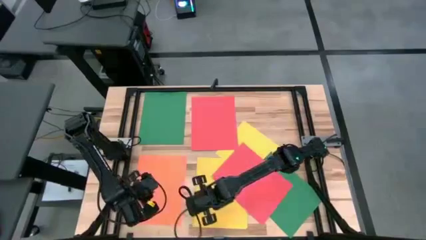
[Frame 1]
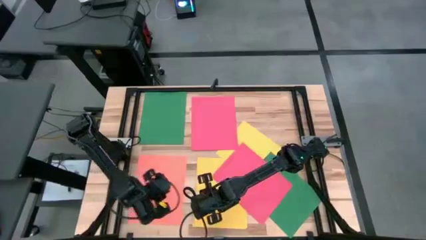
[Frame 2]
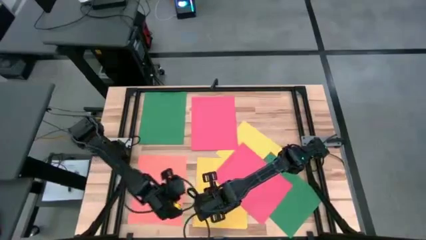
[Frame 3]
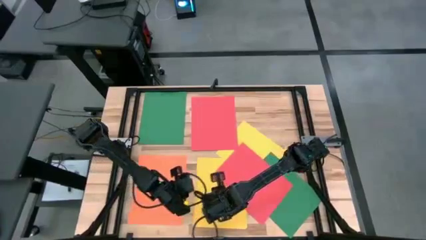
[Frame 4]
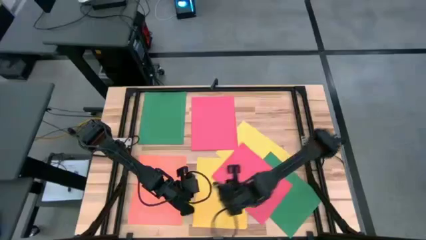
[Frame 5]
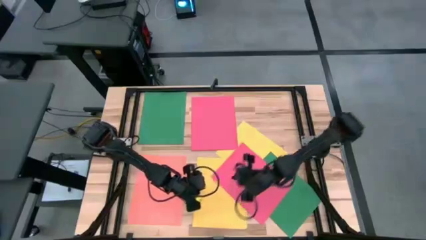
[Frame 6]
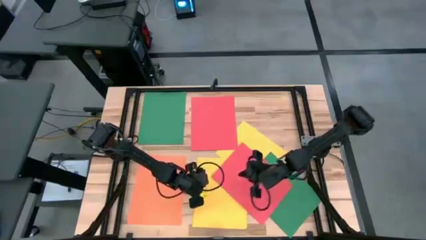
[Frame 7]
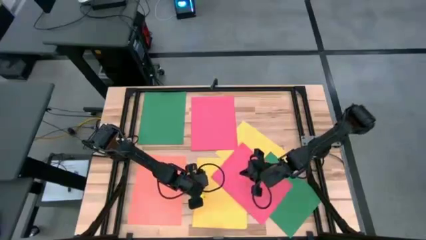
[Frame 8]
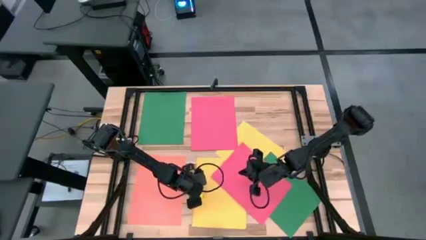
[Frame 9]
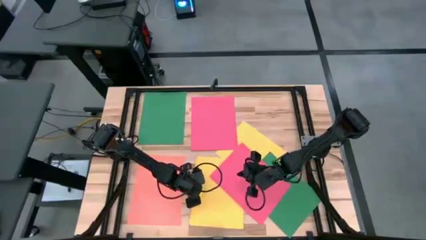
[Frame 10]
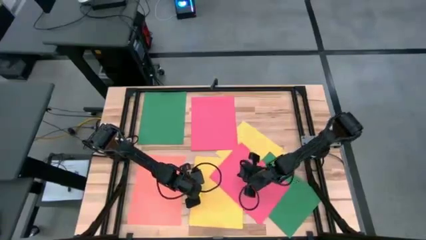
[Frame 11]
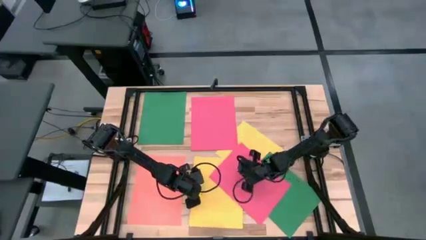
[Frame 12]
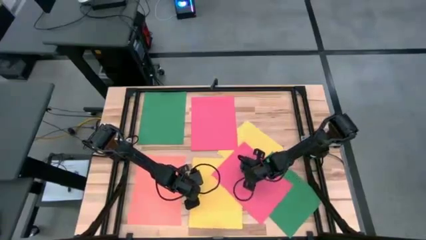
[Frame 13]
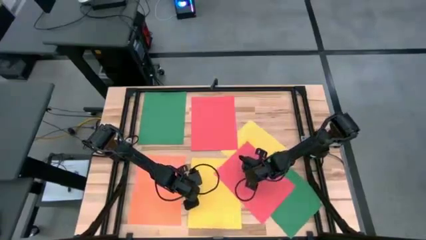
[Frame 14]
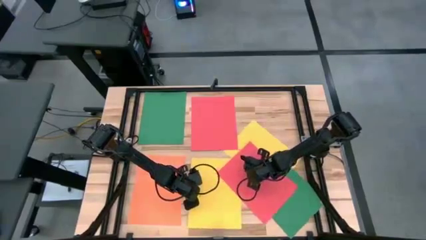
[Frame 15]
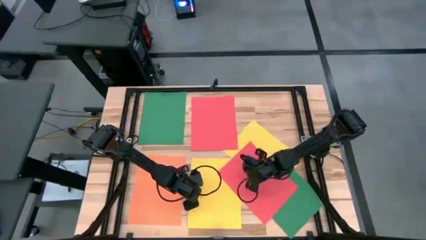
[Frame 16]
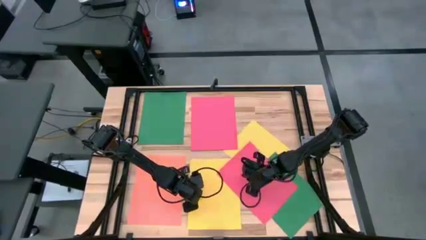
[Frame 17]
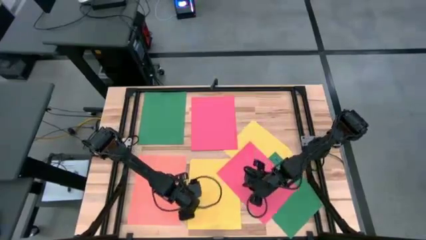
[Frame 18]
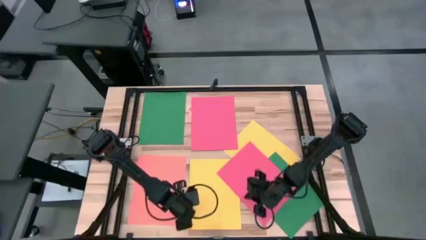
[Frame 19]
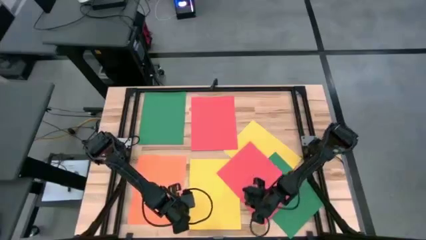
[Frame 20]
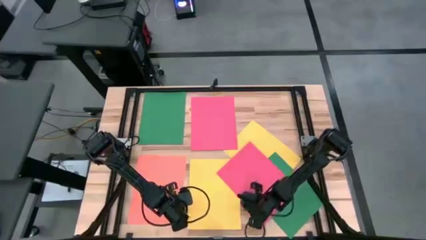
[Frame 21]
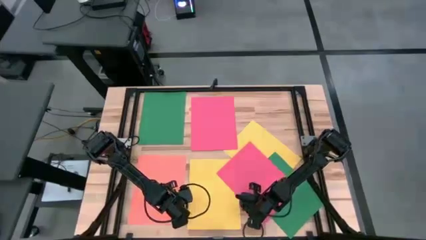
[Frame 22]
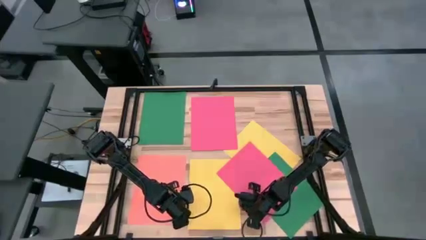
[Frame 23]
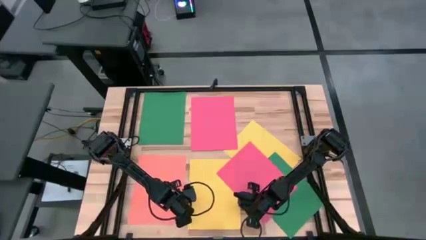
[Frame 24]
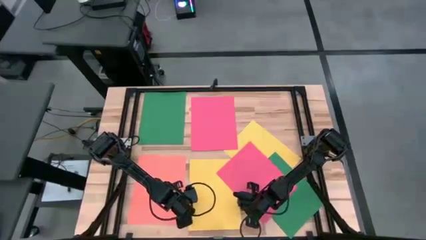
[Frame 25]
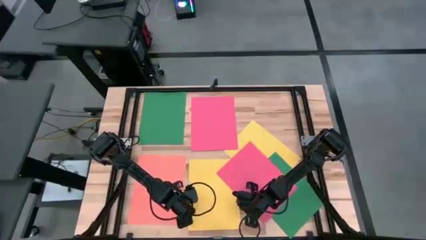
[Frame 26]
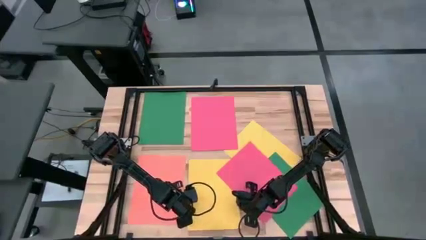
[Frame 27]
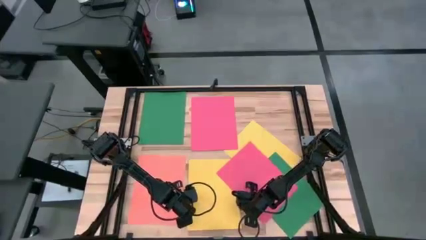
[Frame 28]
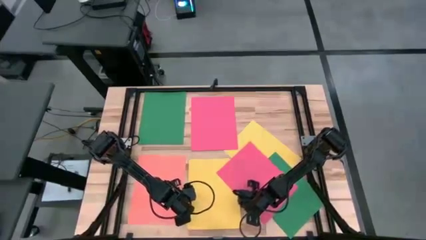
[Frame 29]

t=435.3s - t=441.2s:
Task: Organize paper
Adjust the yellow paper

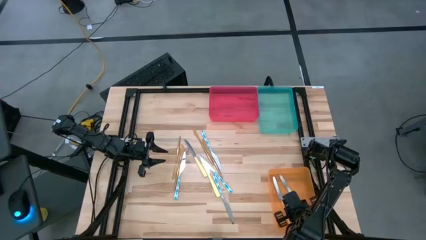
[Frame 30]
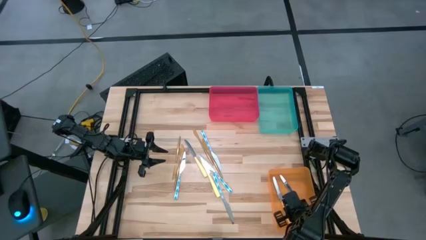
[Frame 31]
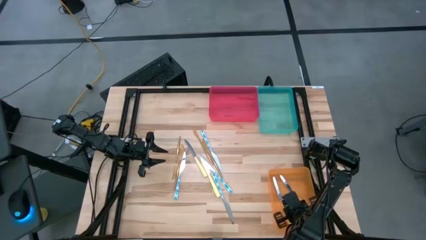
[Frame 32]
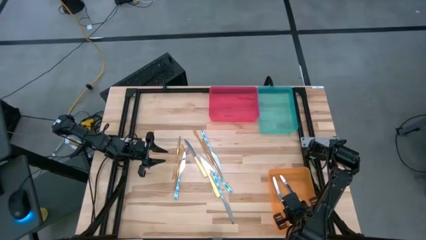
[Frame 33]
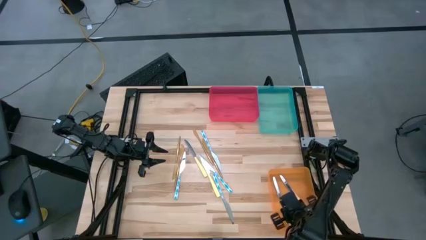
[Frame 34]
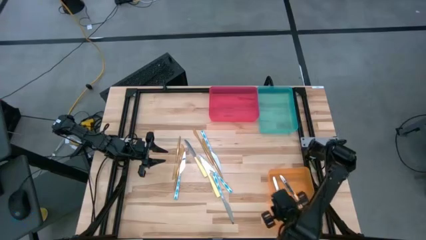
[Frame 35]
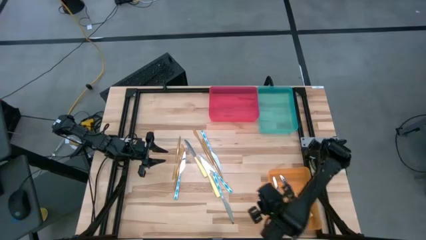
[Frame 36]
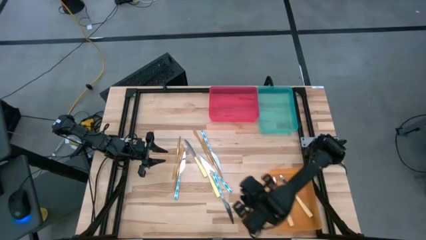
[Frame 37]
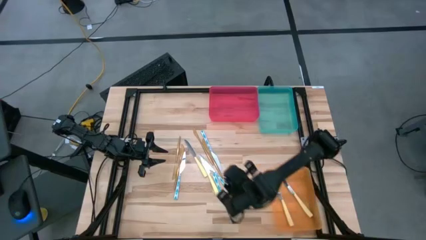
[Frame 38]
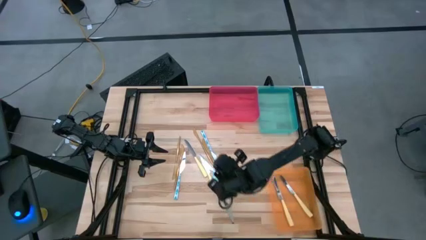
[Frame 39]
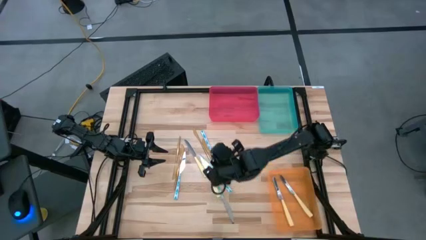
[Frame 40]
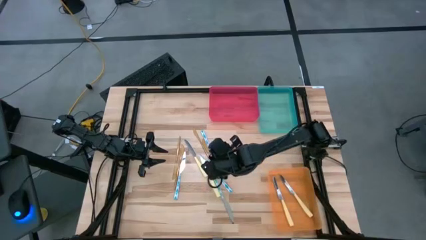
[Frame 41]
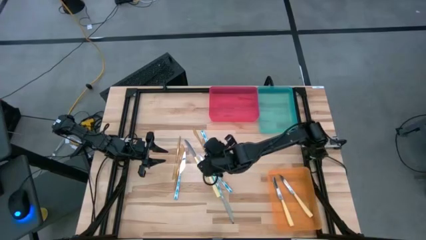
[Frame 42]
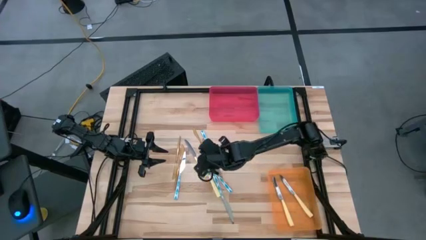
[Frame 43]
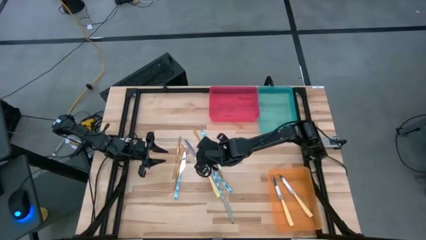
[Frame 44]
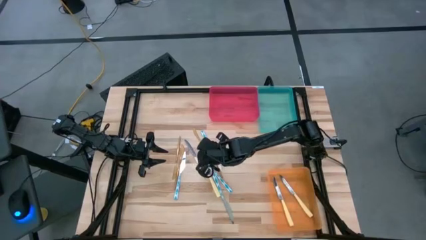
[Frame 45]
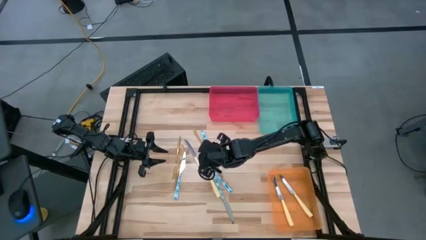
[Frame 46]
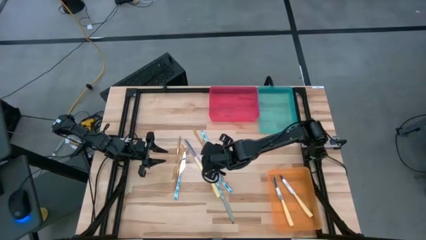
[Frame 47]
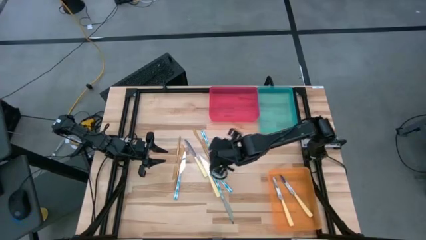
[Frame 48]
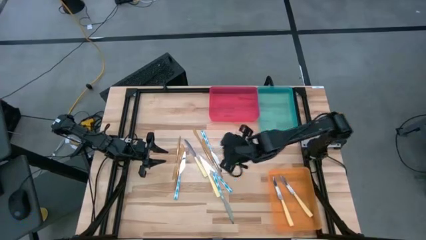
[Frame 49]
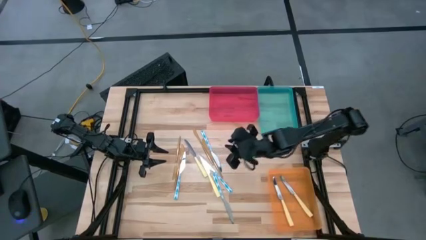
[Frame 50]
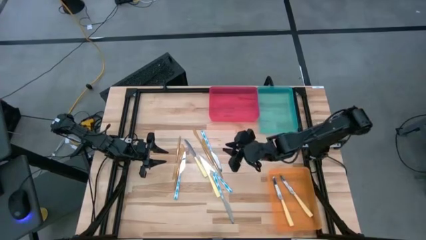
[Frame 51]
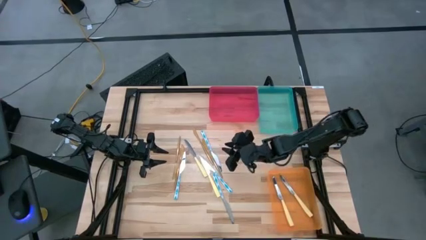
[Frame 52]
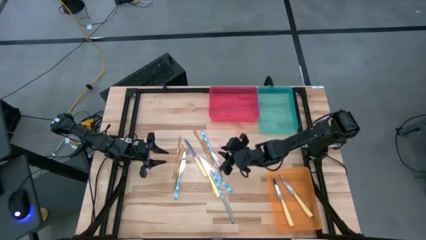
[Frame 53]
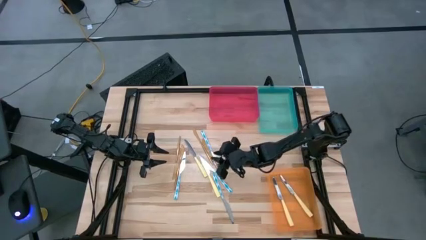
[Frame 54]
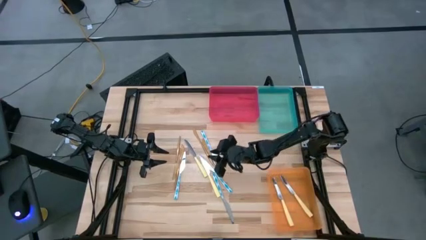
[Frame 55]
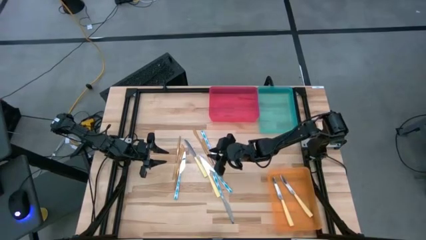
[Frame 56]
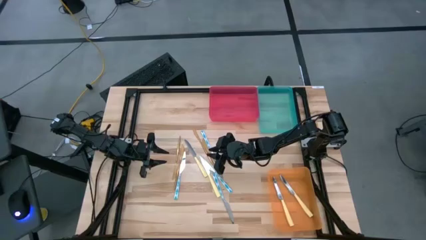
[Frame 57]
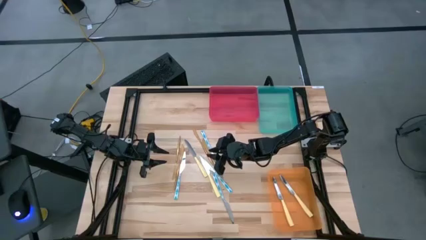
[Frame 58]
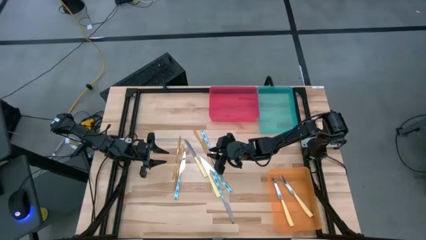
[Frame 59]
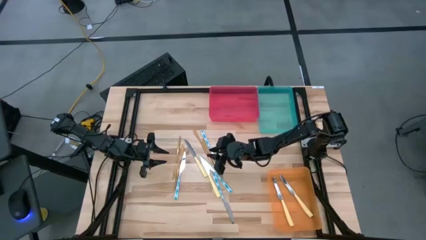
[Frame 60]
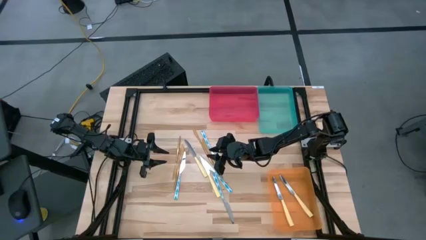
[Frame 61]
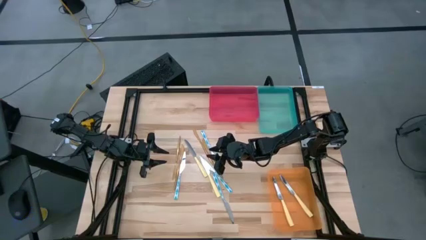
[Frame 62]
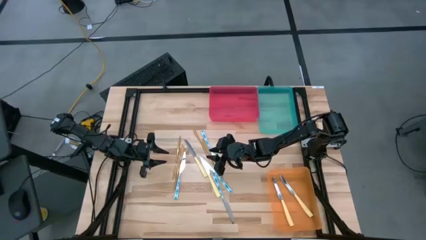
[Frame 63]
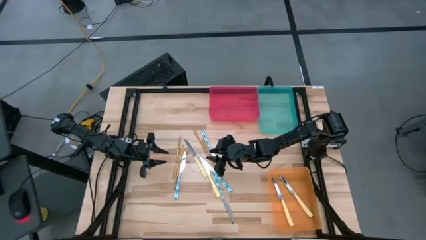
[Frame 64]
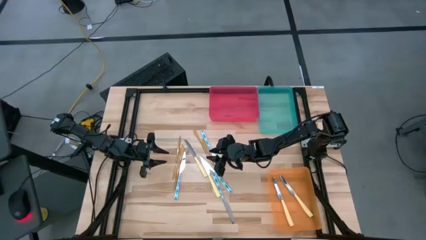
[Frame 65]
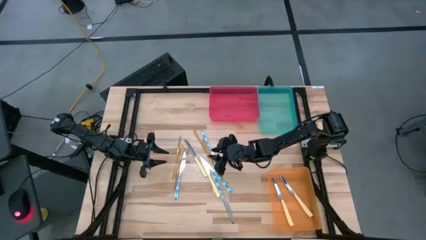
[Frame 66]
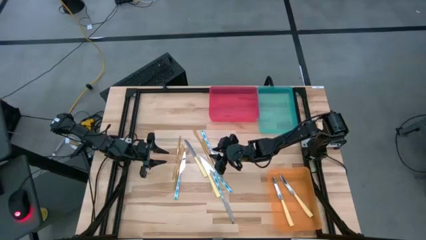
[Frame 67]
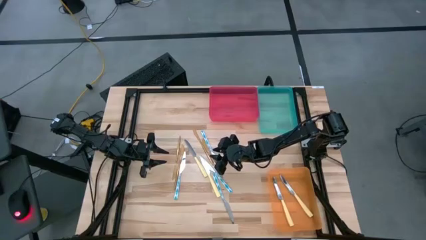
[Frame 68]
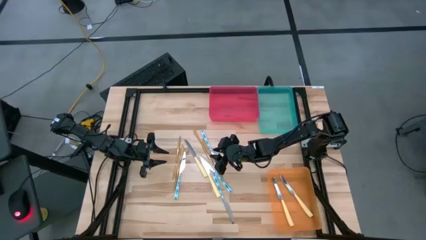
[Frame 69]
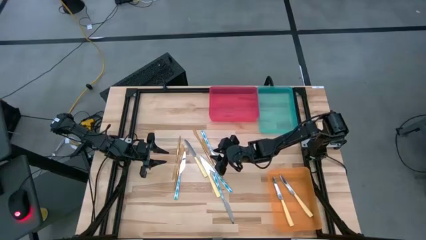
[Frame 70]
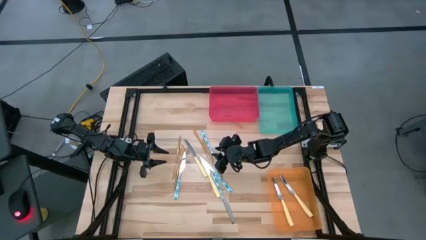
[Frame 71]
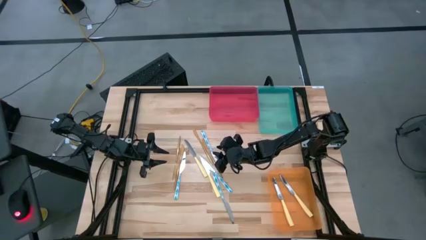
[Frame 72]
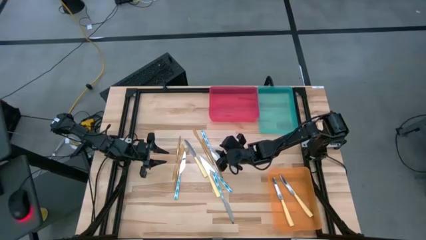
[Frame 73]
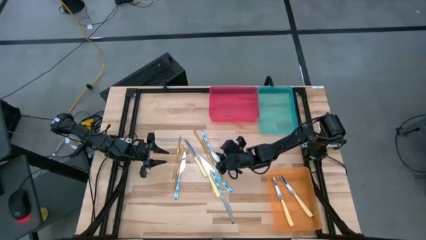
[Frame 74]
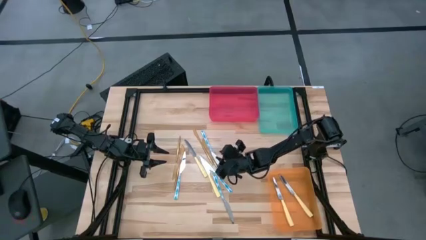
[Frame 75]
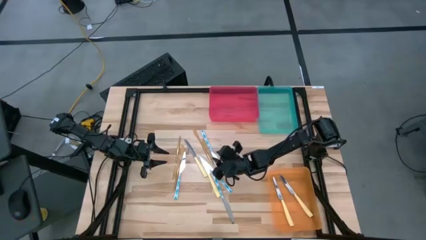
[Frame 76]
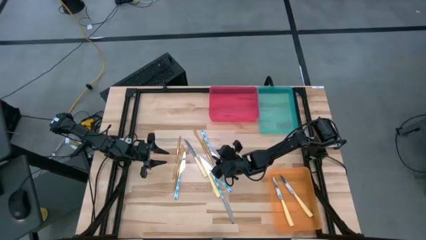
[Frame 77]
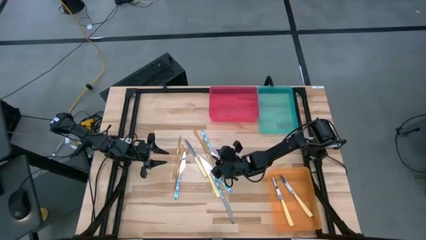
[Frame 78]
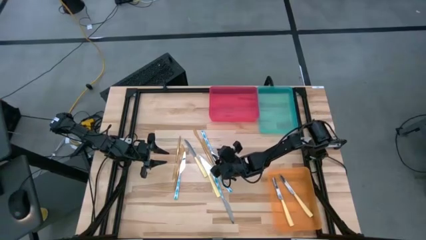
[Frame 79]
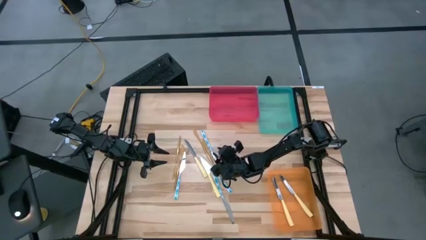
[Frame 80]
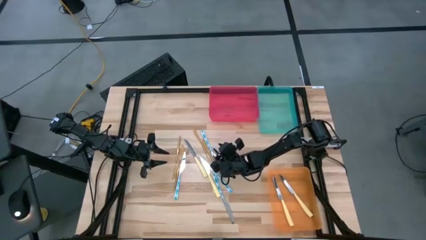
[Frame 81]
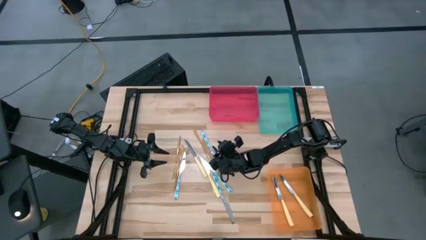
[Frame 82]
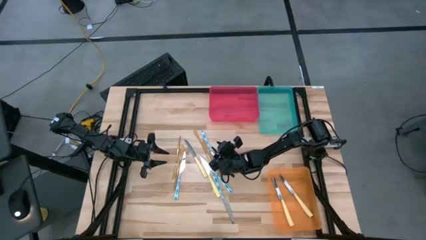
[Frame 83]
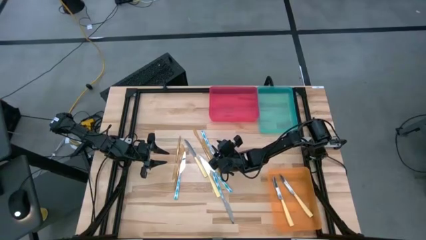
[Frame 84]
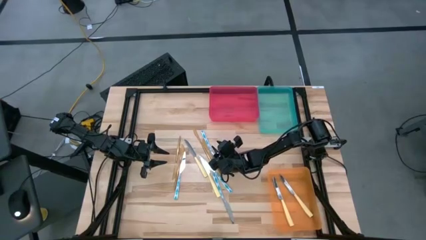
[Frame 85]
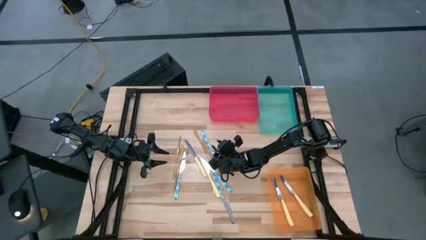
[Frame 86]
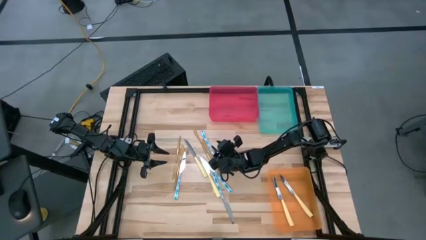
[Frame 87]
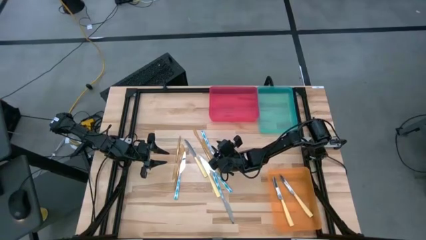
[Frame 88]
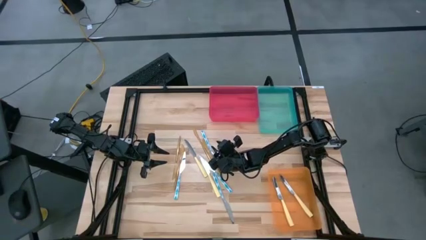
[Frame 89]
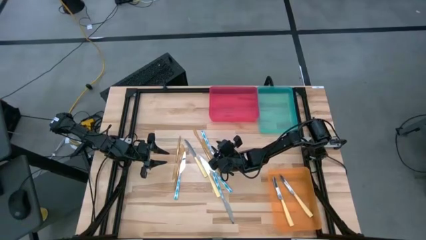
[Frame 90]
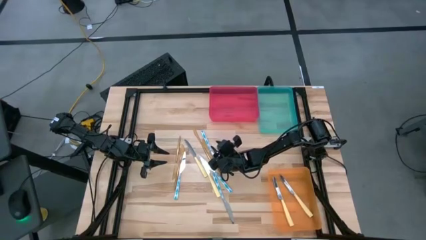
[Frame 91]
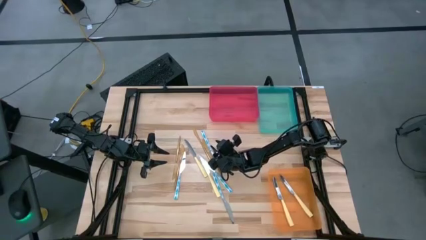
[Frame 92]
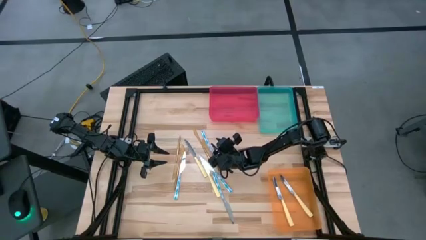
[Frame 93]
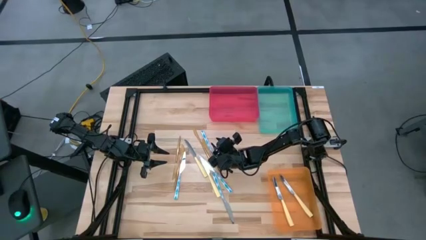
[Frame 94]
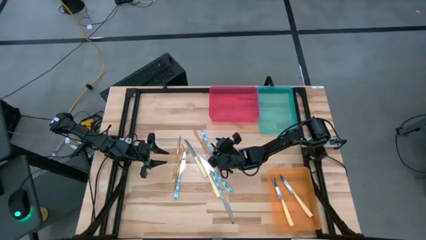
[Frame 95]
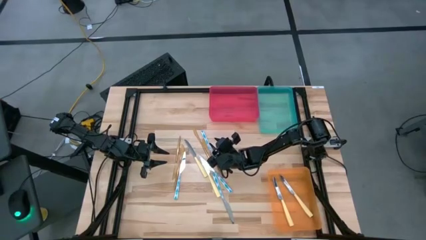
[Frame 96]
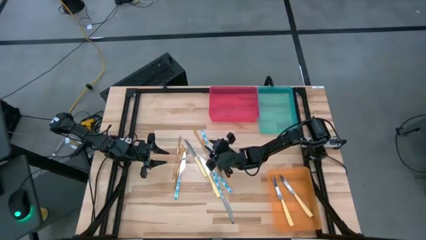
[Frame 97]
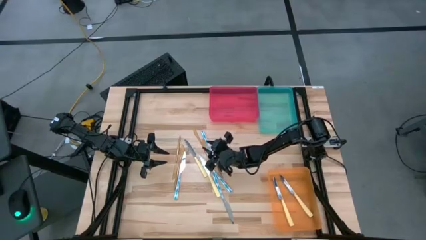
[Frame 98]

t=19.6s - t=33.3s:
Task: Sort silverware by color (type)
Put the blue knife into the blue bin
